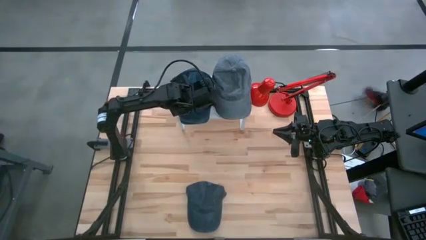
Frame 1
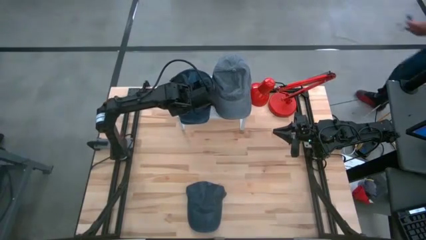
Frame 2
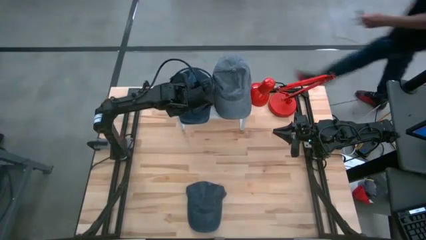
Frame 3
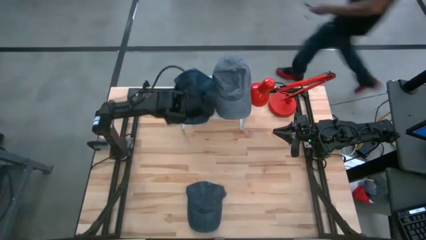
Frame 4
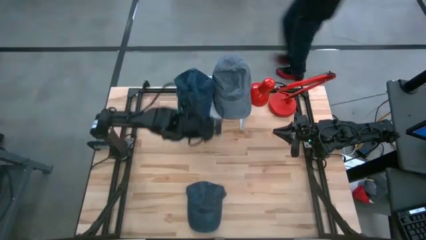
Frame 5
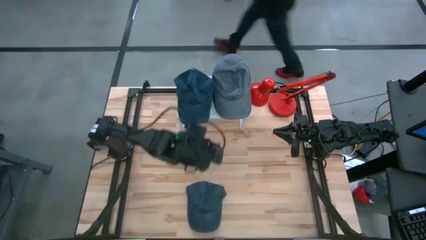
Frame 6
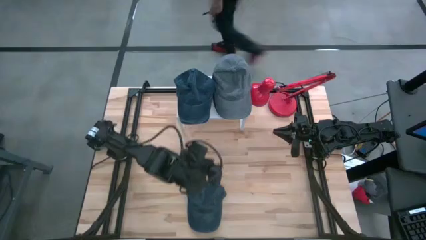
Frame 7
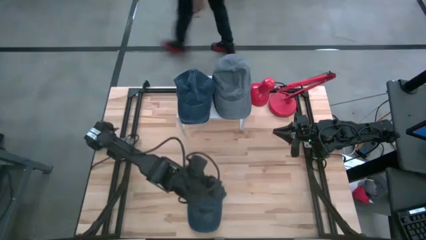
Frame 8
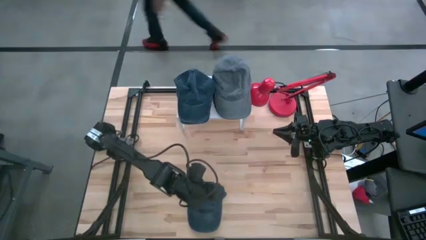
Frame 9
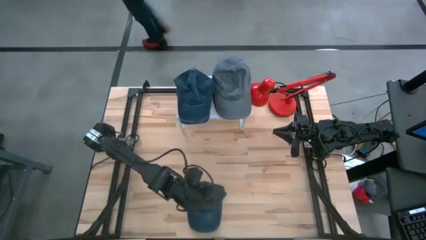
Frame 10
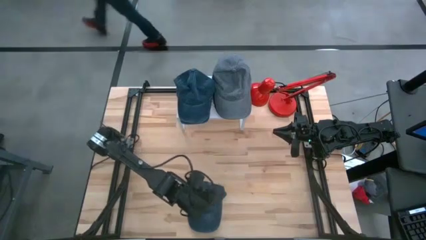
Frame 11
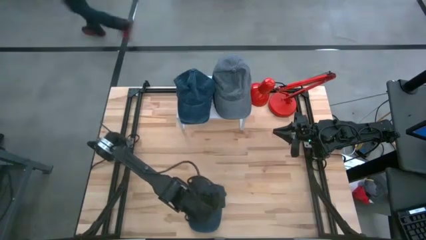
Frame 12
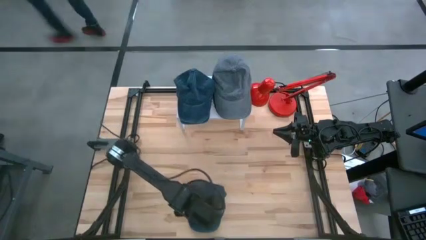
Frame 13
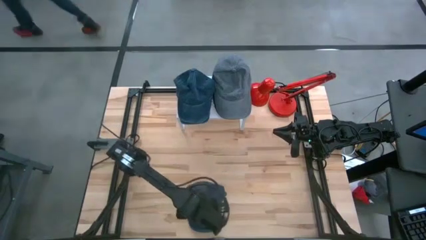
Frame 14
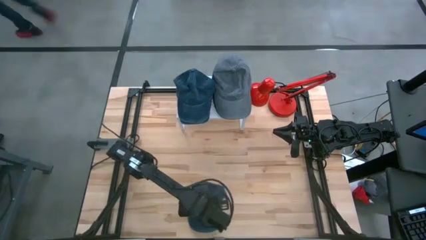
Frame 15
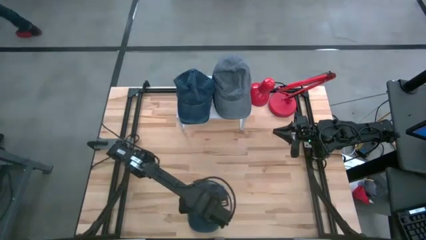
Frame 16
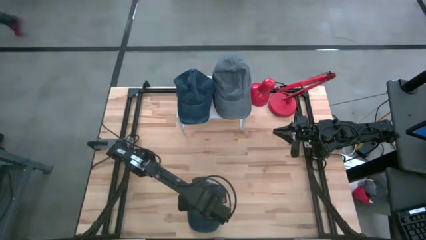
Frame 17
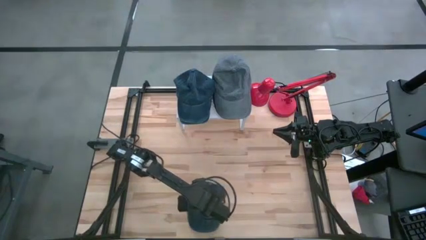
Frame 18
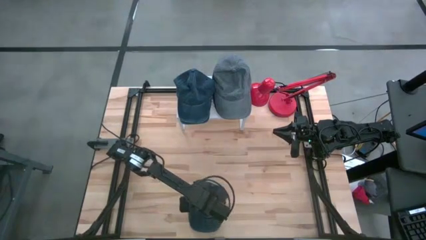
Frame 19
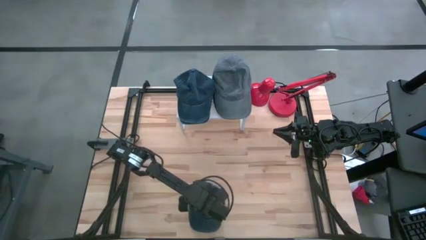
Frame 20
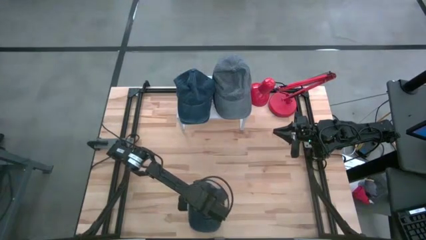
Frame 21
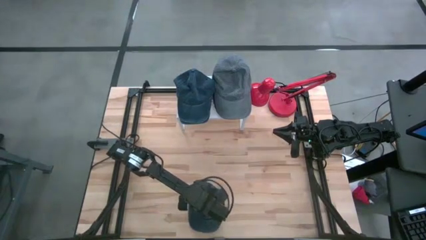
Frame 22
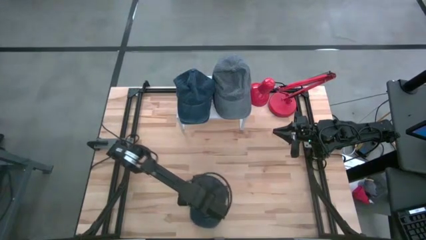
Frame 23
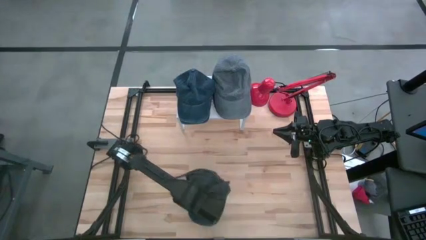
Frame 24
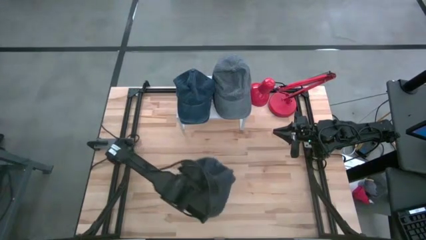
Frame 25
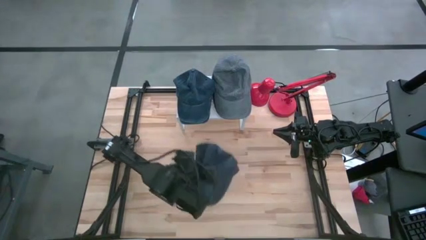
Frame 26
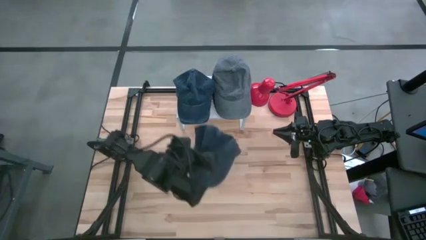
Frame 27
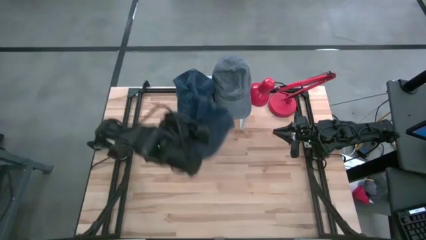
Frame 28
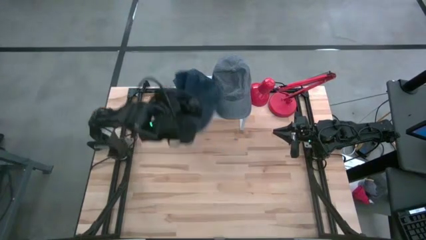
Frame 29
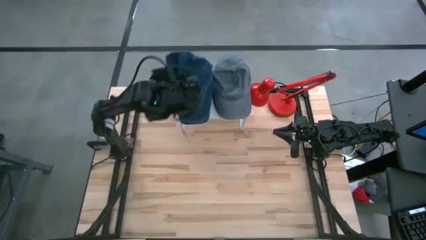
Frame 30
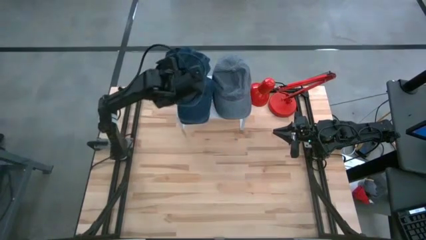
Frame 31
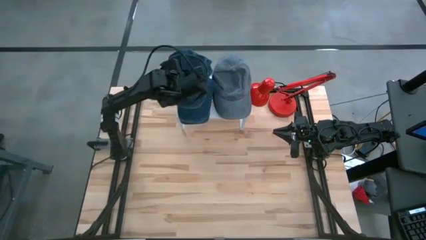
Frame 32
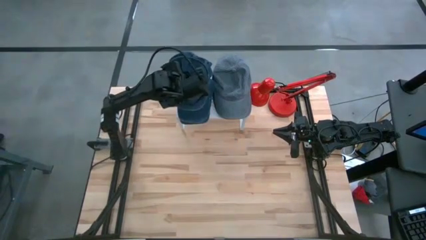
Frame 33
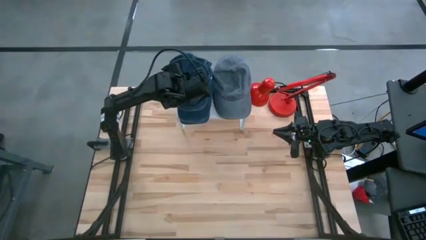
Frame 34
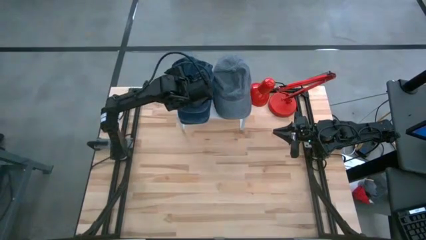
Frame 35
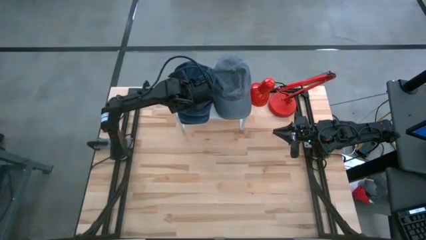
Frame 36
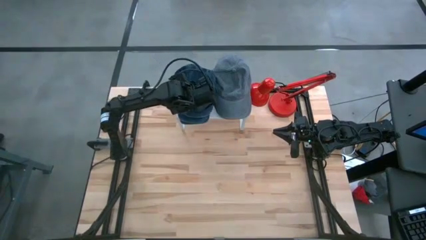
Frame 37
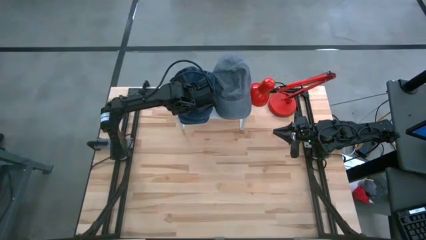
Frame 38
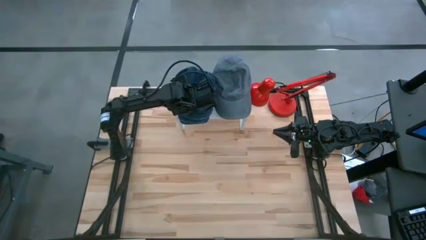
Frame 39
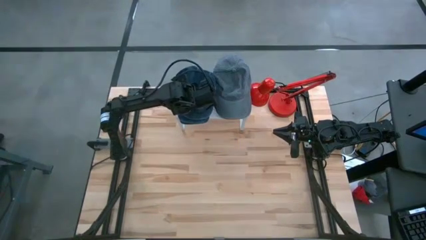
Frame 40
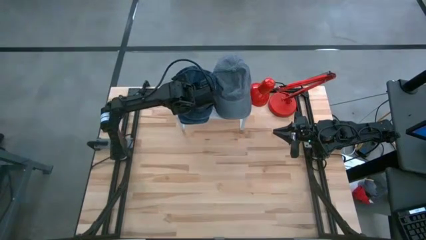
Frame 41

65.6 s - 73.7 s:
Task: Pick & Place hat
Stack the blue cap on the blue cap on the shelf

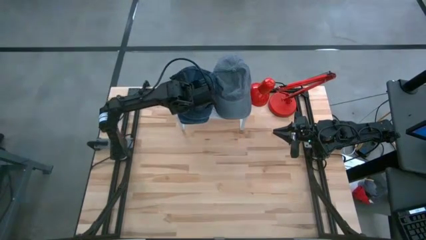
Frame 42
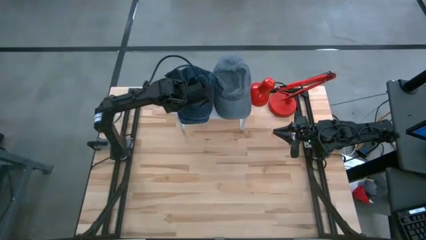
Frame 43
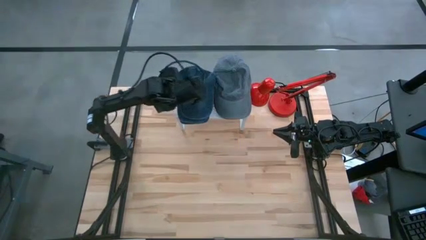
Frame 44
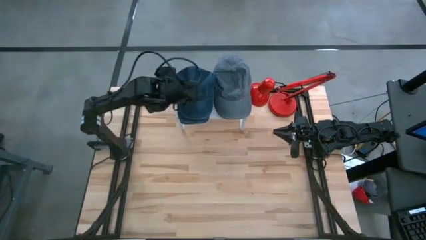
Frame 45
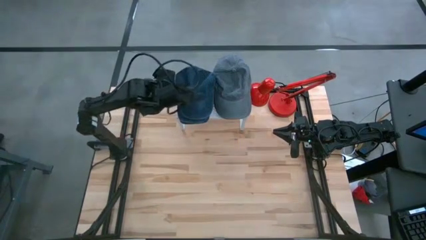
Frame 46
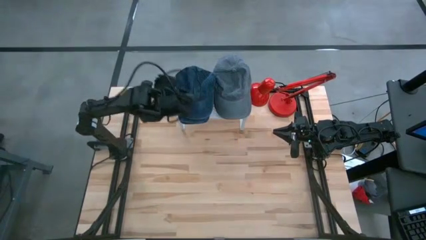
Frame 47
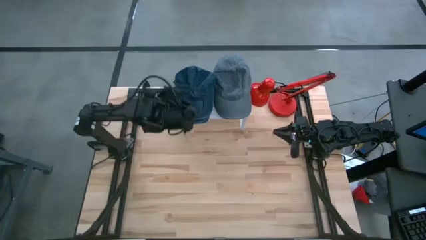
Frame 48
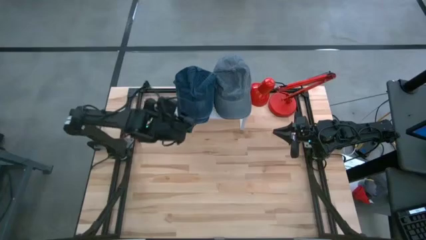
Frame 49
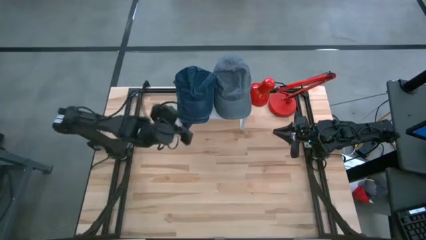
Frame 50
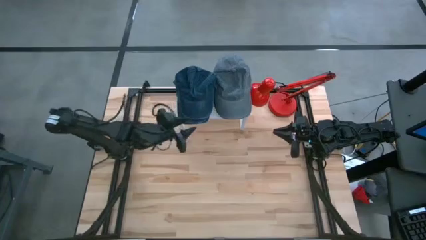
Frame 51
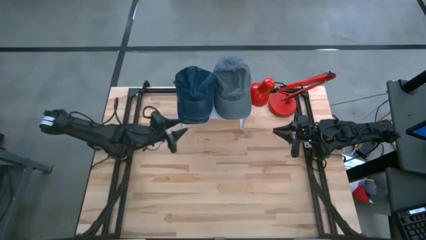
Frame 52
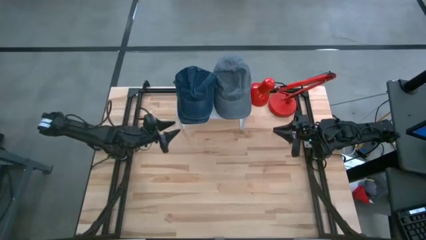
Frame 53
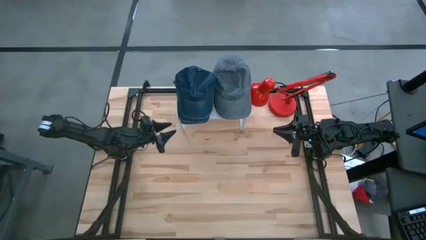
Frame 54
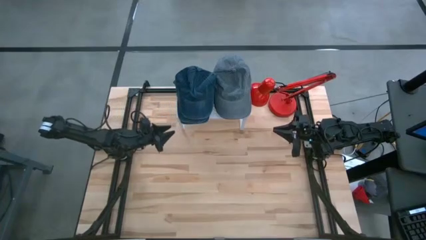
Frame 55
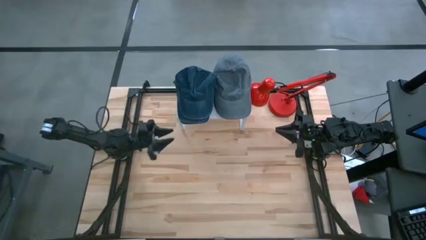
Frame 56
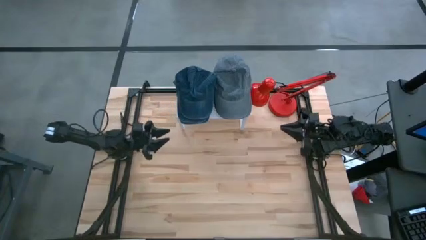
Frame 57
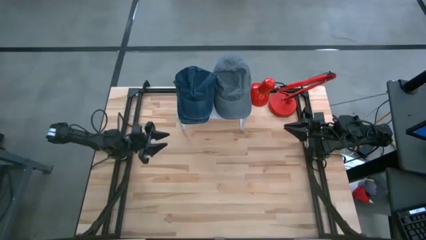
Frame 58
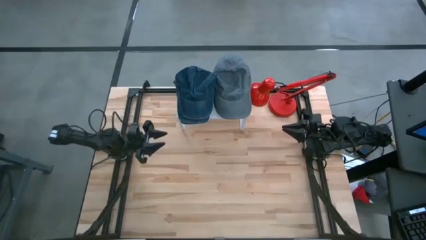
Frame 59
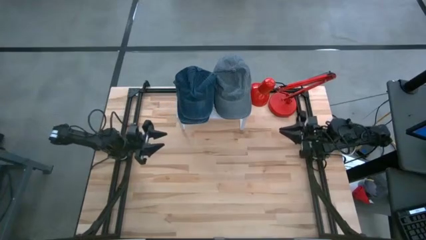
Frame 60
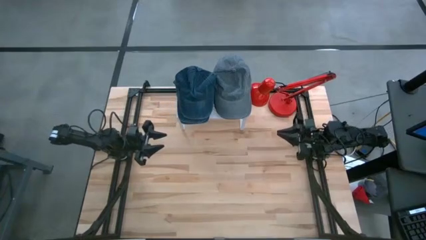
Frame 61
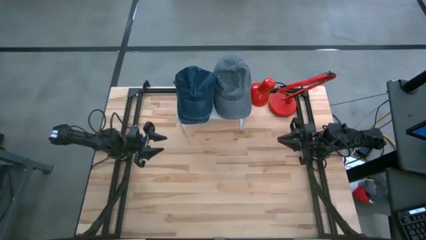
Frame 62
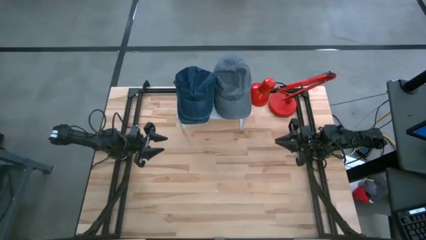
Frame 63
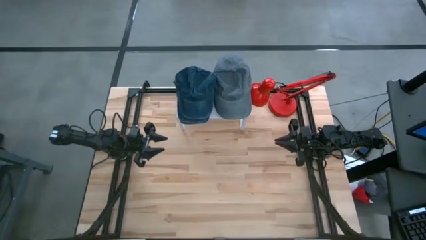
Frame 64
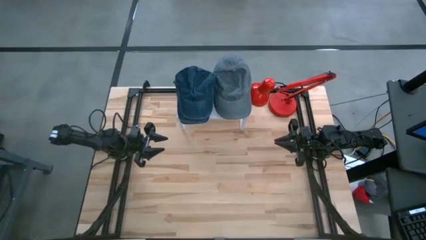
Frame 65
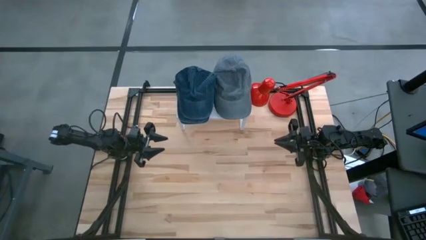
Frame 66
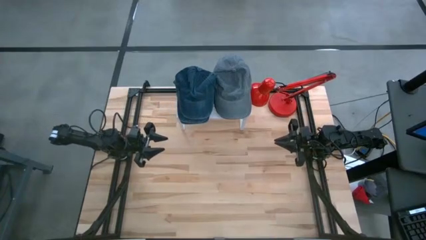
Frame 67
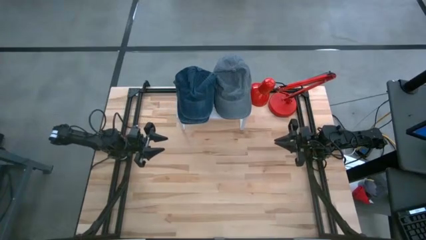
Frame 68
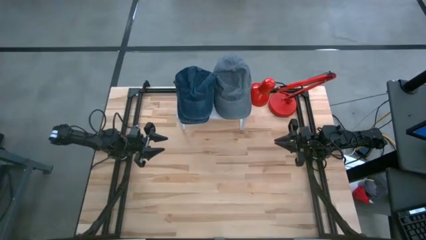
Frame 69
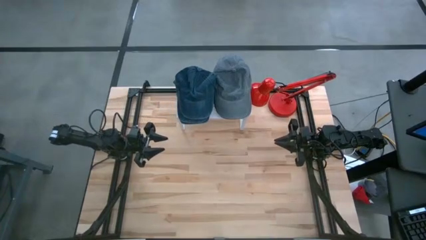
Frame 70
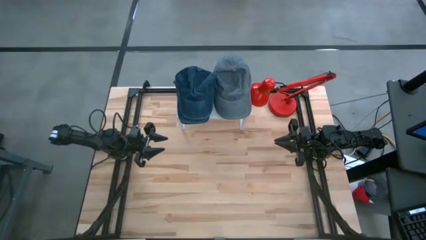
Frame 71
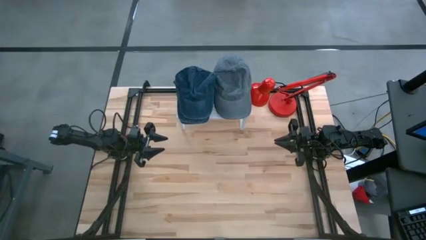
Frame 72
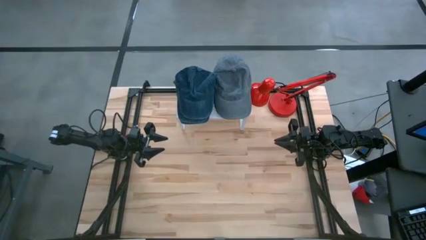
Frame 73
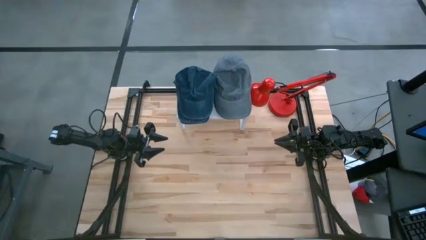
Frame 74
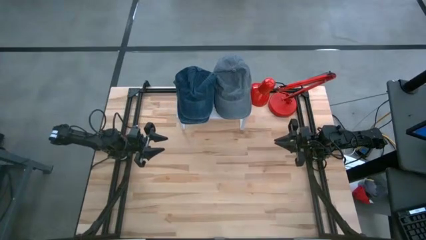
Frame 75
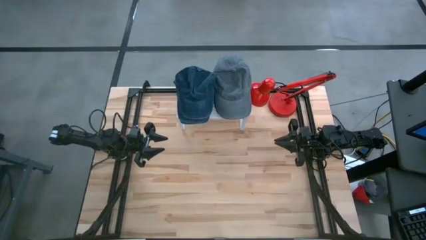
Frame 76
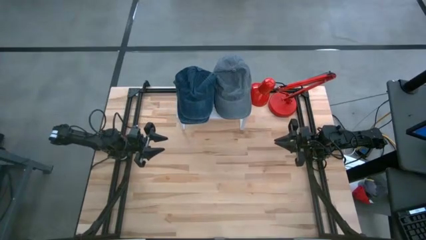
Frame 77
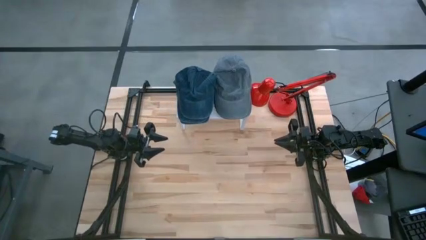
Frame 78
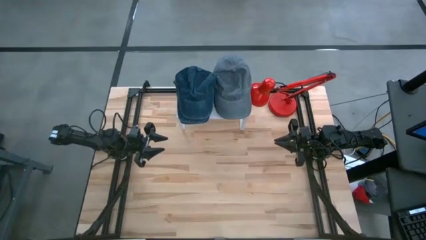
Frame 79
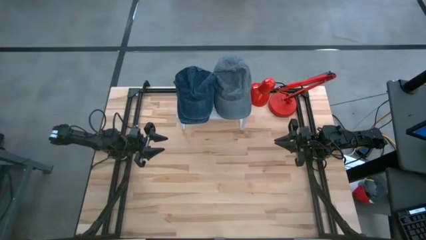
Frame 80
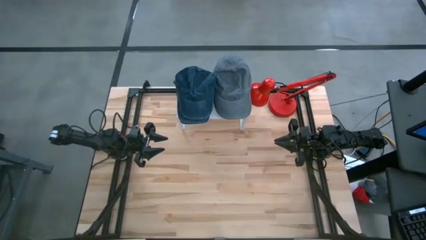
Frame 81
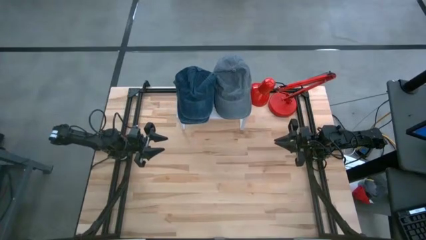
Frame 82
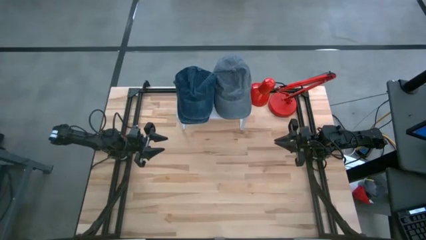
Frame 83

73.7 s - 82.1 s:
Return to Home Position
